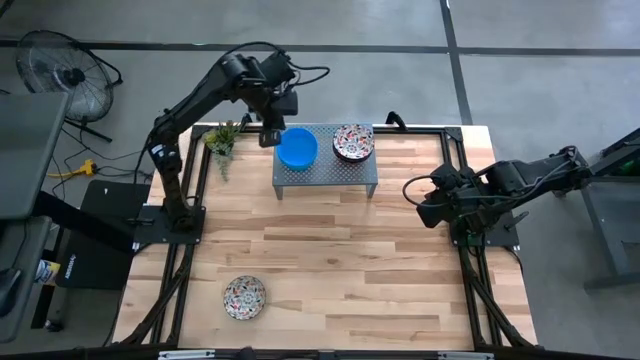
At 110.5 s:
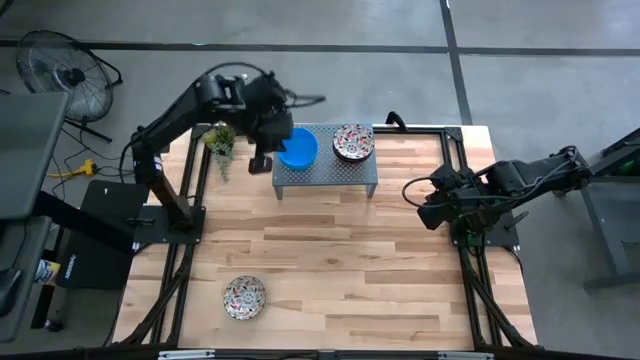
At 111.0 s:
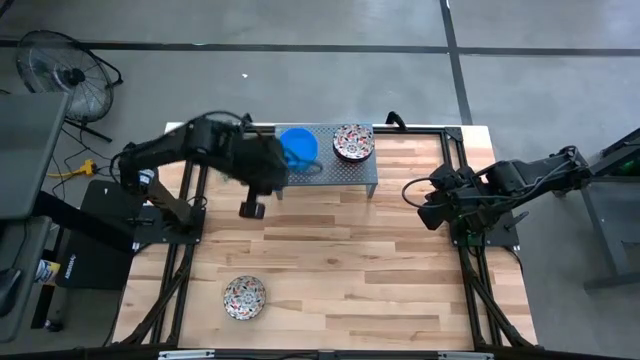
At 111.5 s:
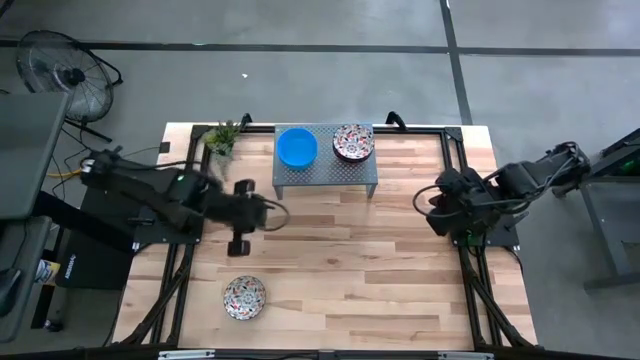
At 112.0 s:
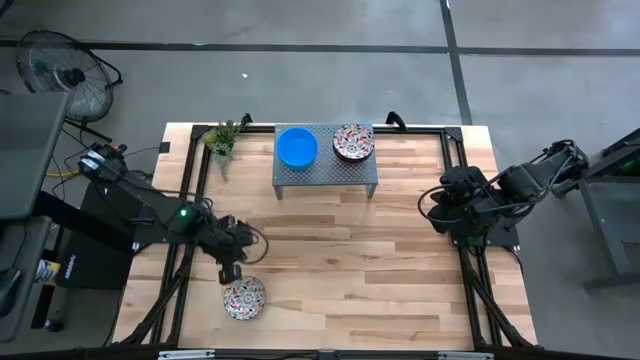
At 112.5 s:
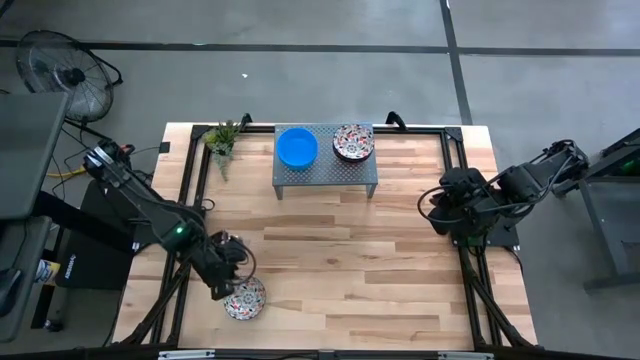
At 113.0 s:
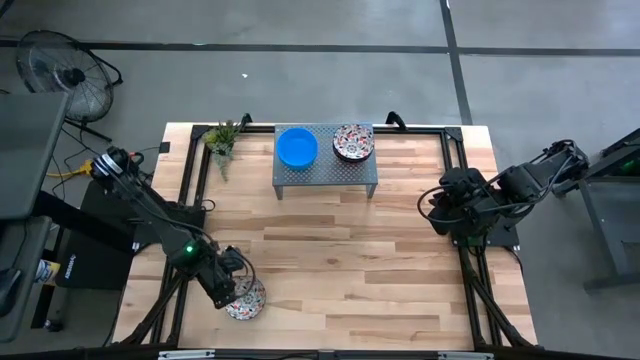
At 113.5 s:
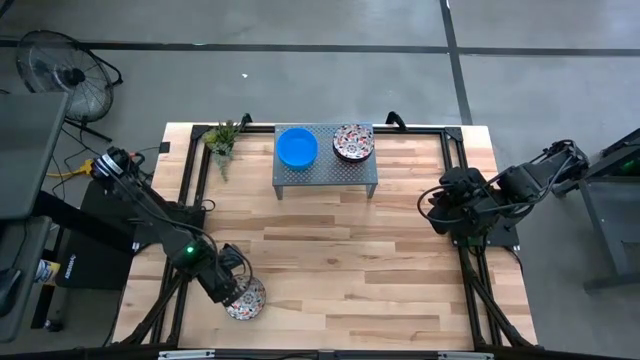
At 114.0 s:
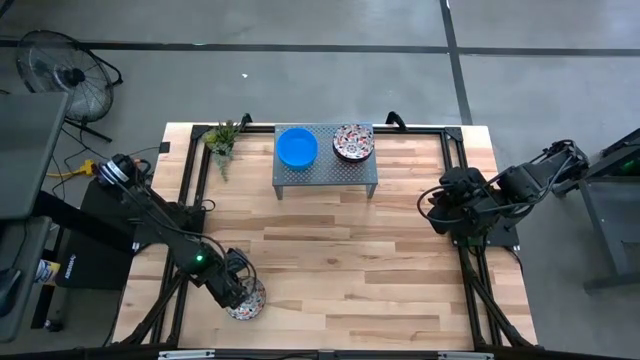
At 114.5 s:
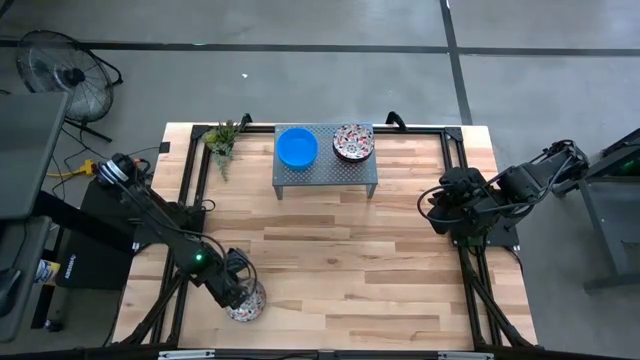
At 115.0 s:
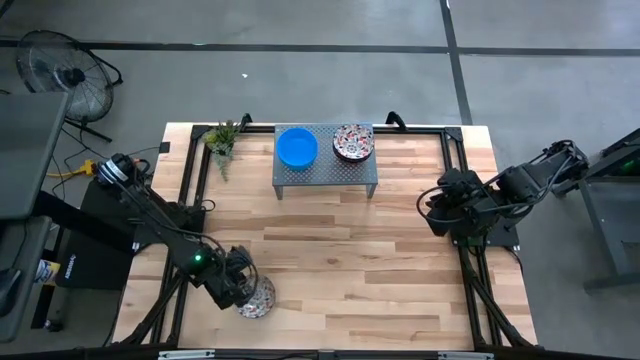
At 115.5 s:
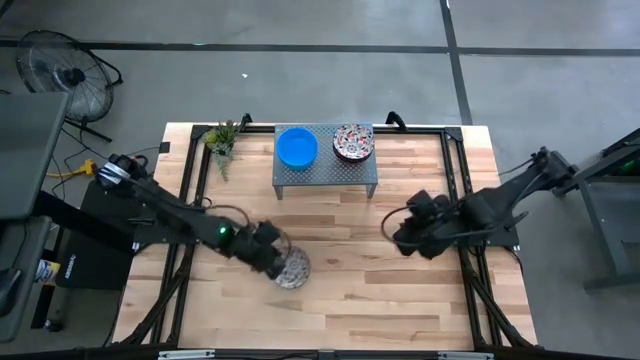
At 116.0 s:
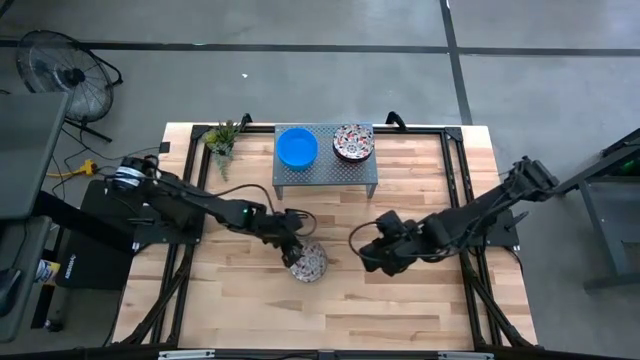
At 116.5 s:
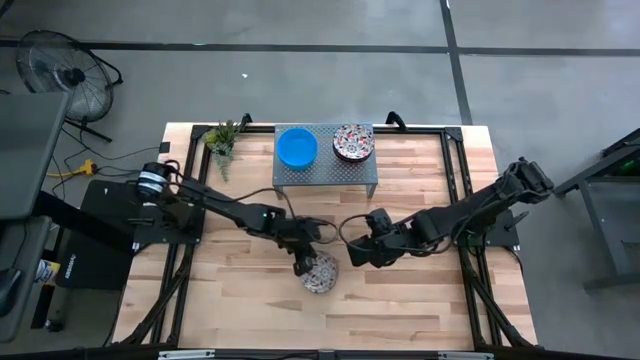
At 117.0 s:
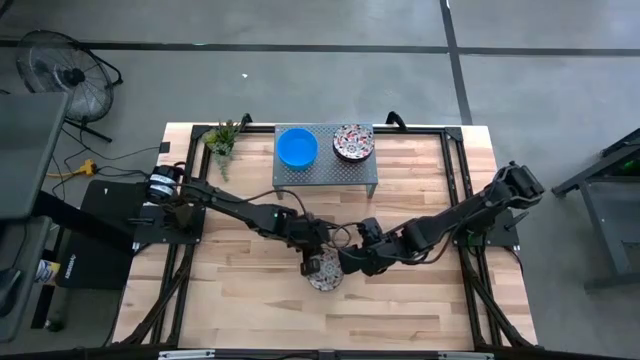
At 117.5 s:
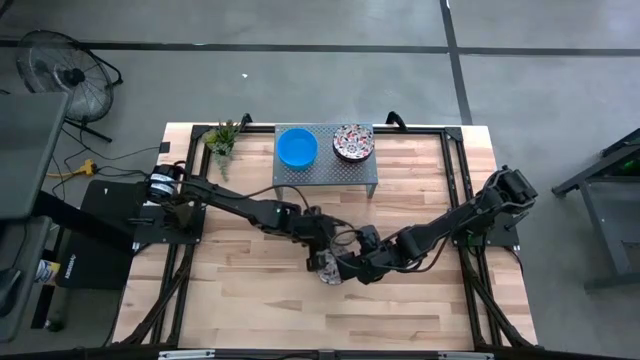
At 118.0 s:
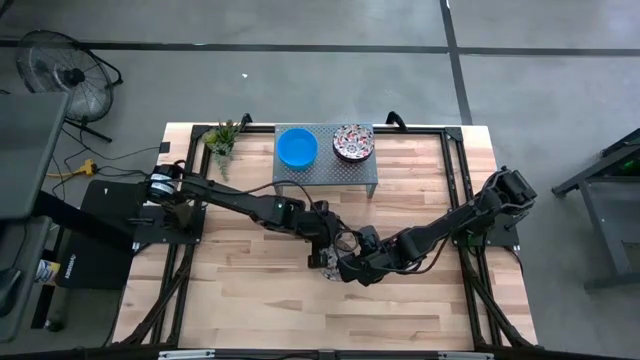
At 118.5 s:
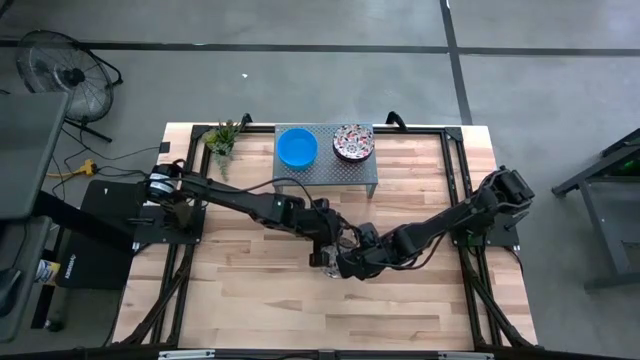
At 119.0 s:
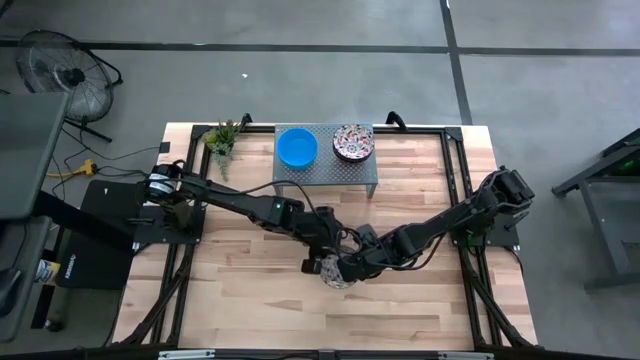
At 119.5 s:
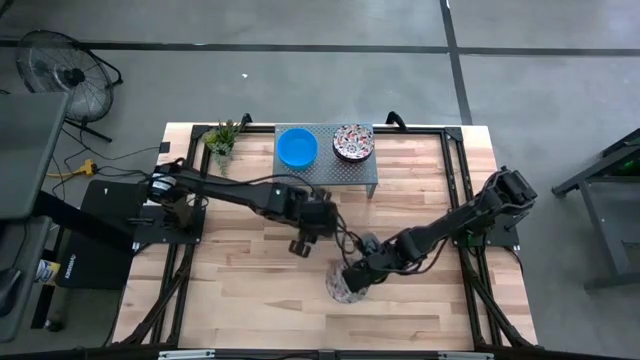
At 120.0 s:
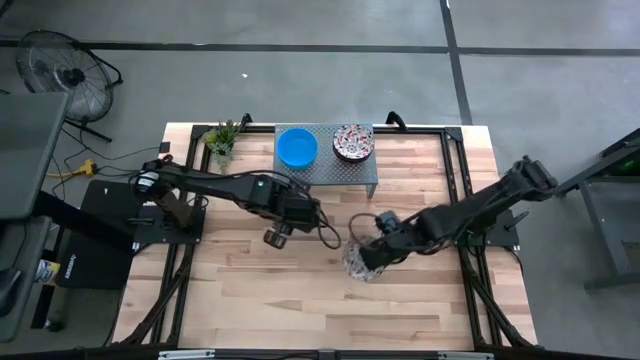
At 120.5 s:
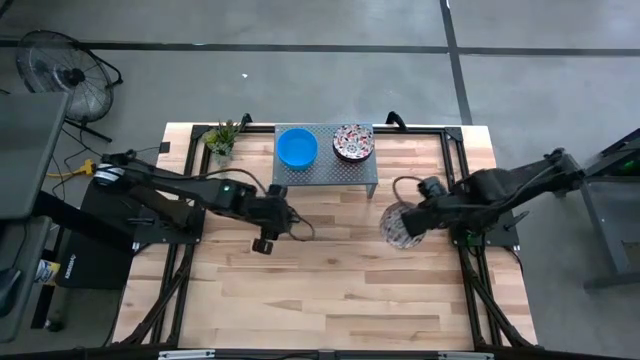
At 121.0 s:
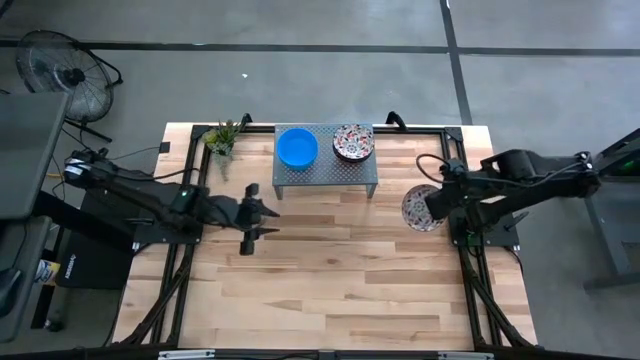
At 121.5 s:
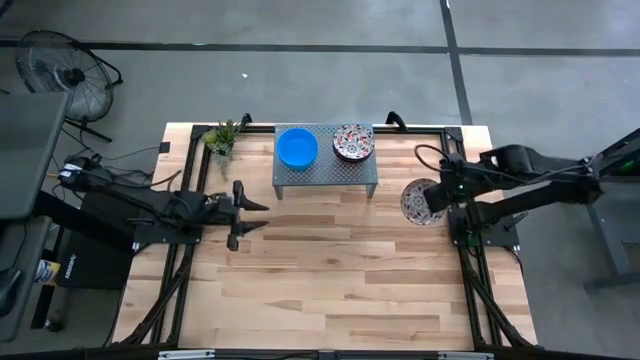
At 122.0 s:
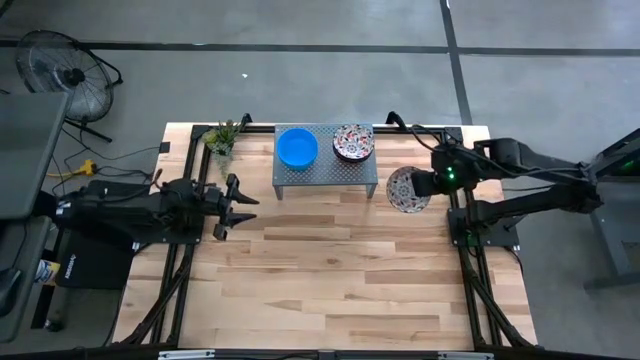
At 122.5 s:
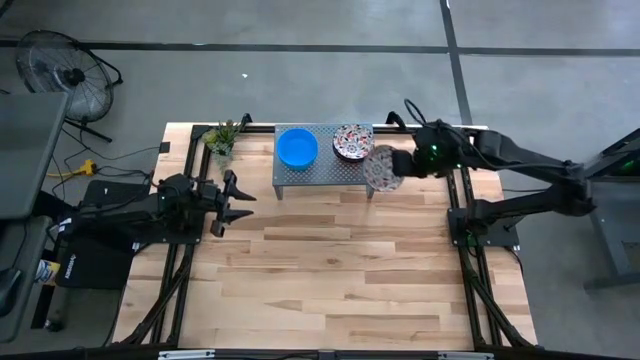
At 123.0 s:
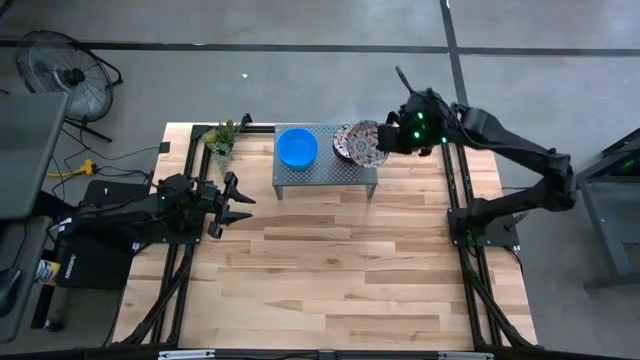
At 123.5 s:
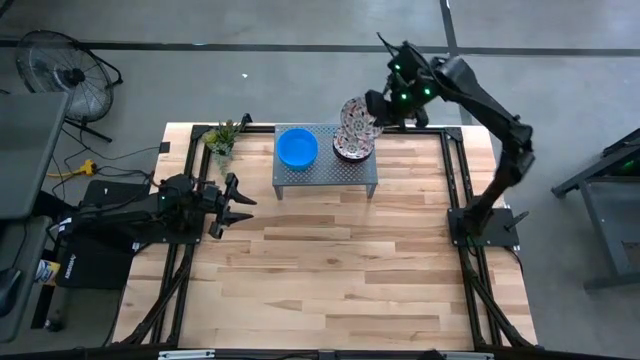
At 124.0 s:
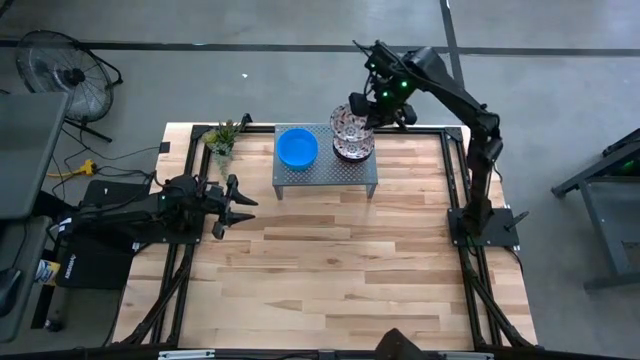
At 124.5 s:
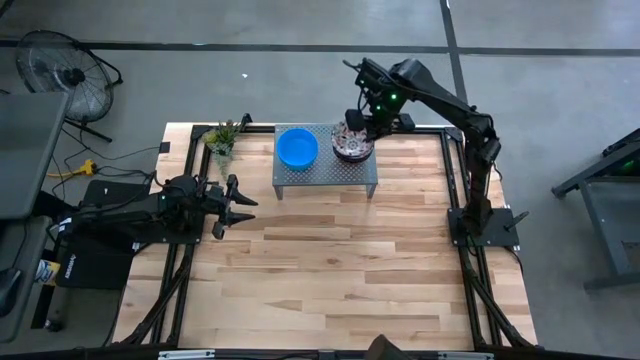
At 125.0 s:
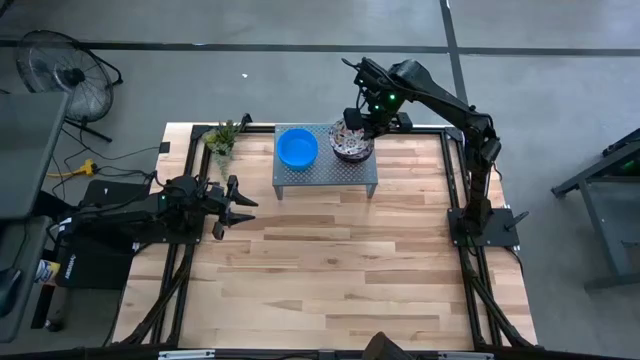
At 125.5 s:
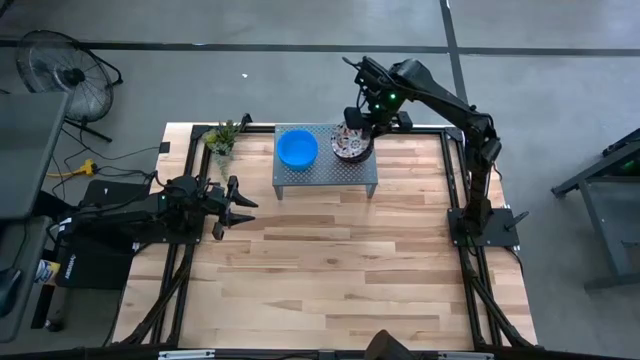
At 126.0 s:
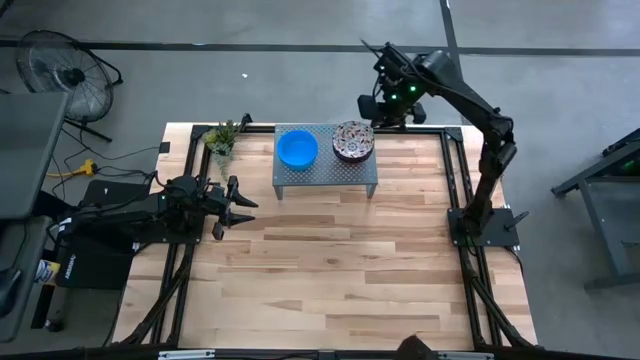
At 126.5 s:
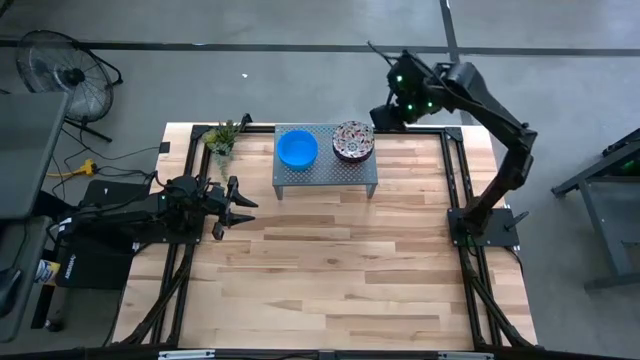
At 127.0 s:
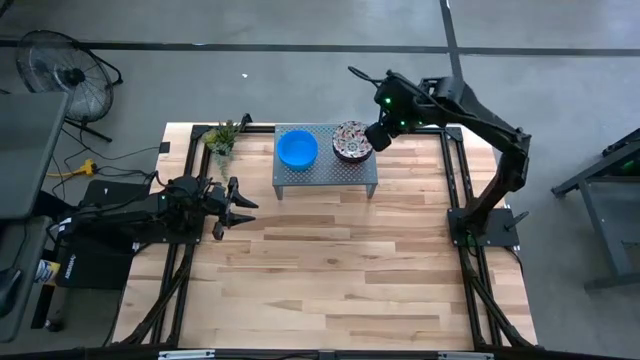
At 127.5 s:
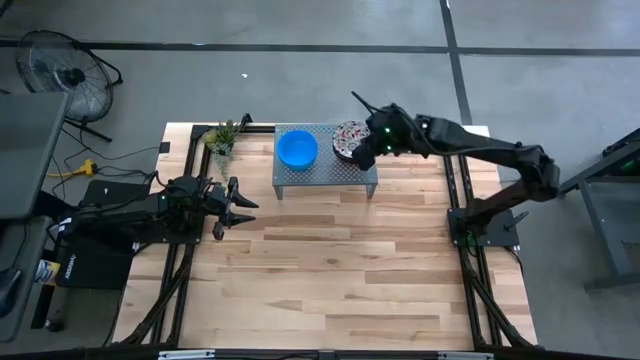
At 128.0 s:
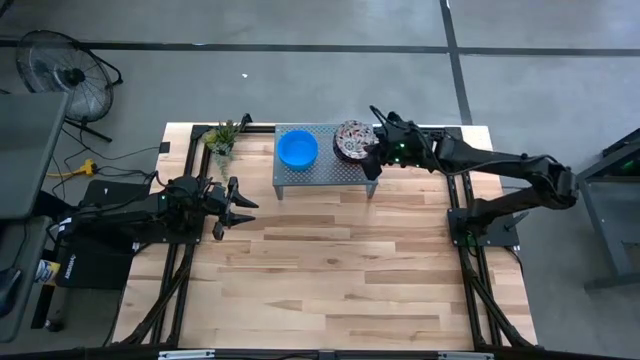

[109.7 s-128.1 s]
Task: Pick & Place Mini bowls
Stack the white patterned bowl on top of the other white patterned bowls on the shelf

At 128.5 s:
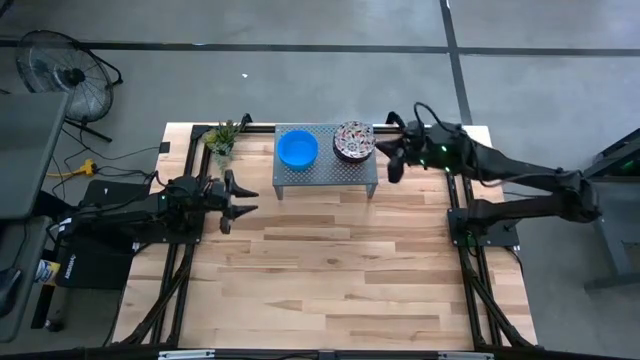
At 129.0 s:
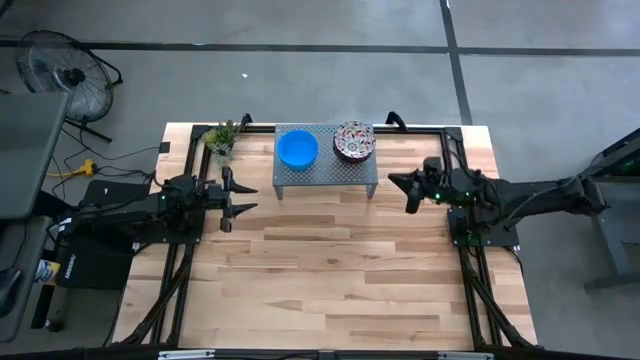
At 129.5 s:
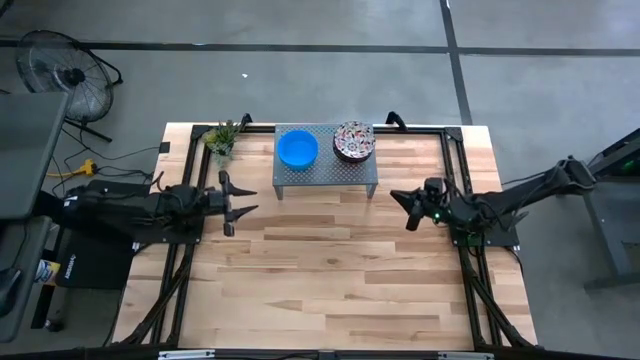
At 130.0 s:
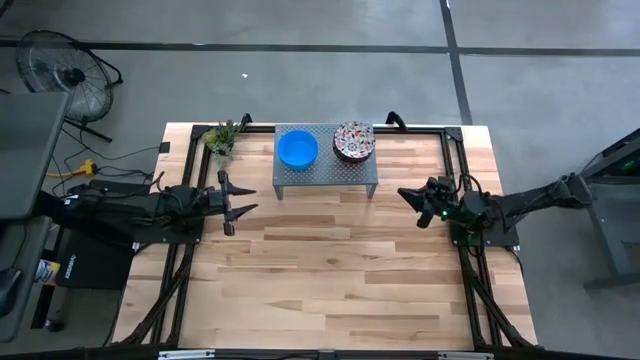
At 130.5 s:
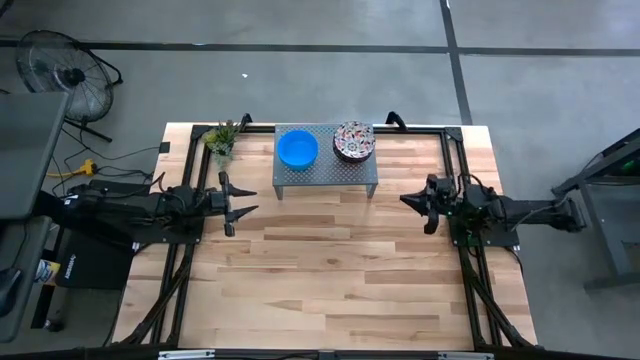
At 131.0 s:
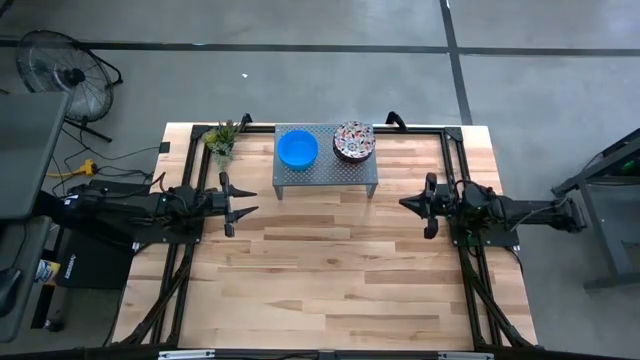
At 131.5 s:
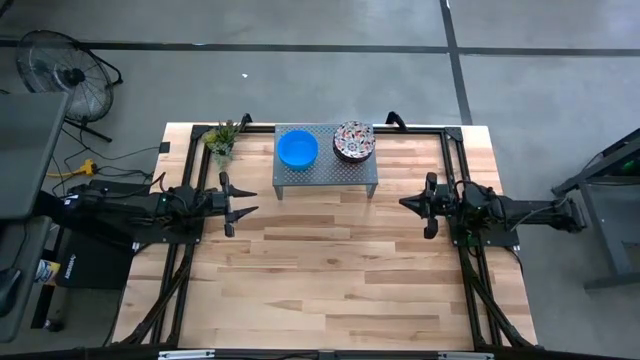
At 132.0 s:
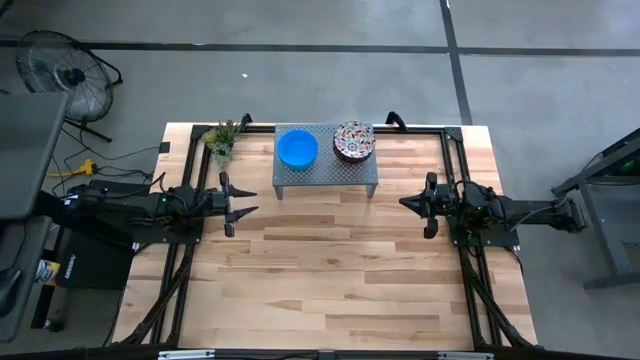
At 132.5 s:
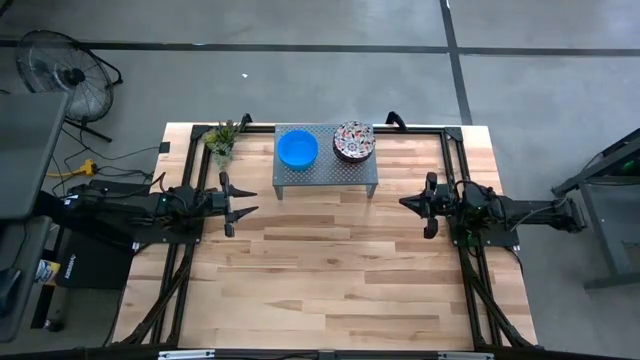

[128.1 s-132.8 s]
Return to Home Position
